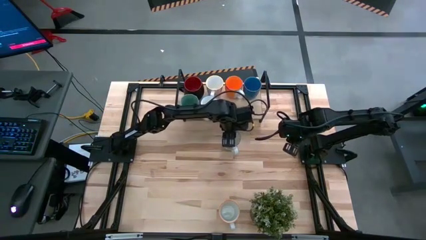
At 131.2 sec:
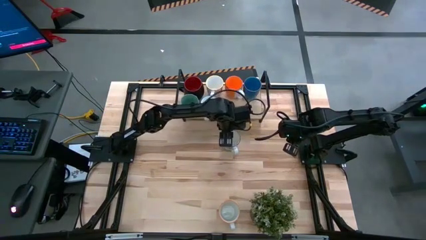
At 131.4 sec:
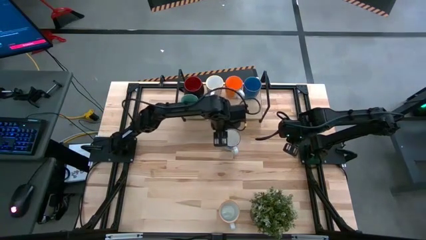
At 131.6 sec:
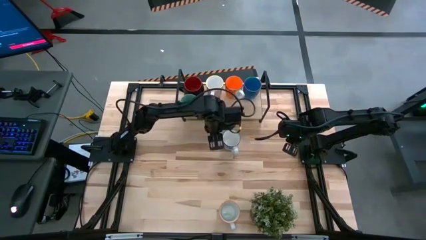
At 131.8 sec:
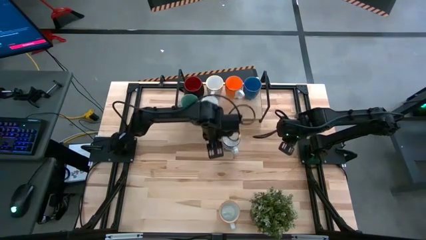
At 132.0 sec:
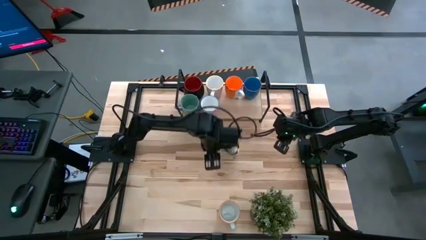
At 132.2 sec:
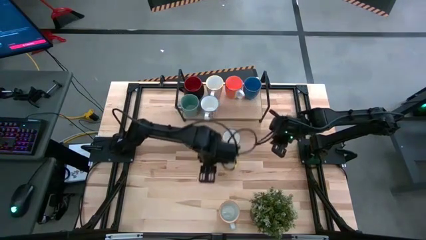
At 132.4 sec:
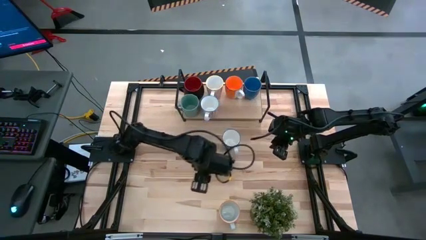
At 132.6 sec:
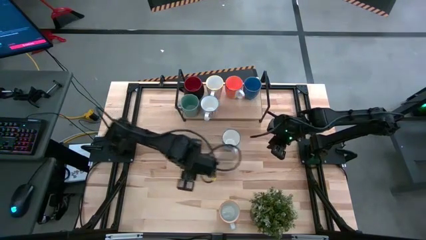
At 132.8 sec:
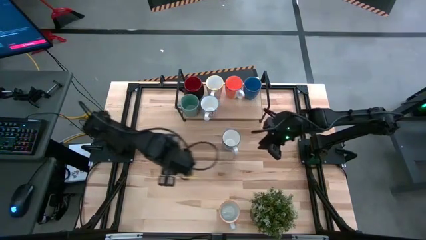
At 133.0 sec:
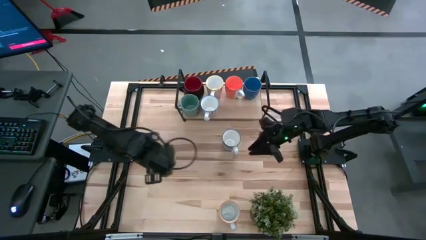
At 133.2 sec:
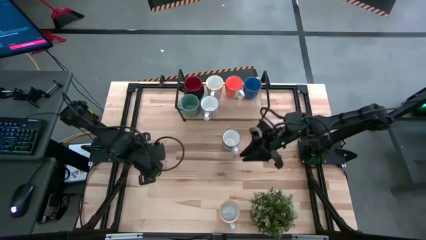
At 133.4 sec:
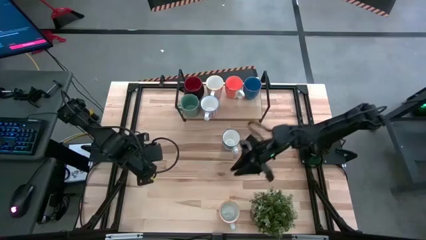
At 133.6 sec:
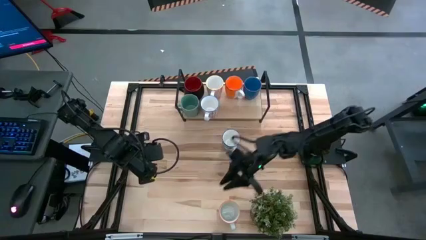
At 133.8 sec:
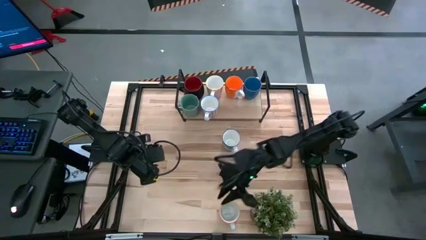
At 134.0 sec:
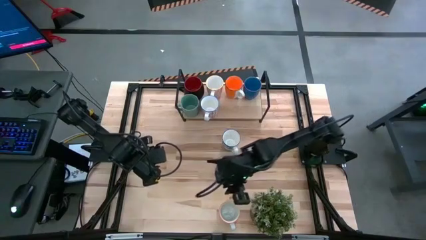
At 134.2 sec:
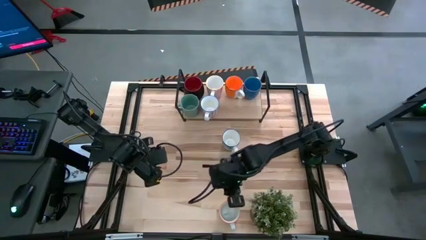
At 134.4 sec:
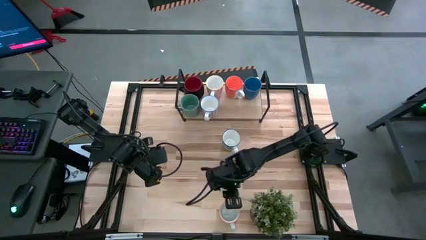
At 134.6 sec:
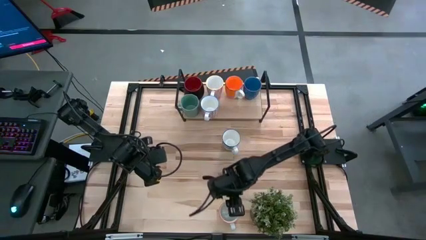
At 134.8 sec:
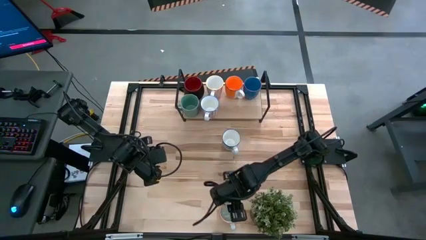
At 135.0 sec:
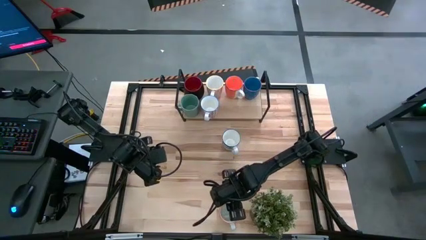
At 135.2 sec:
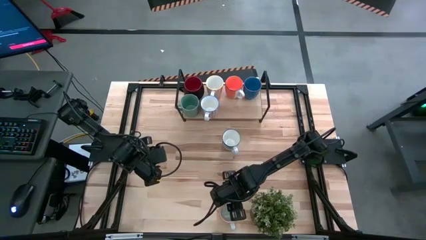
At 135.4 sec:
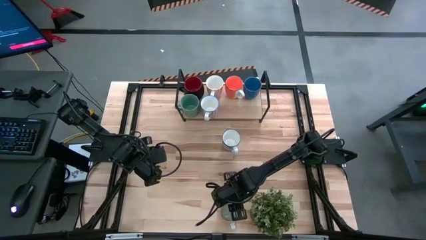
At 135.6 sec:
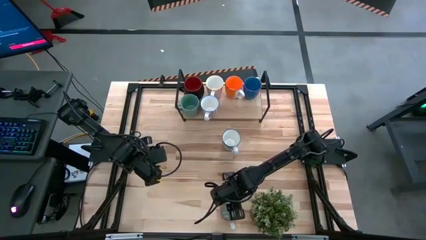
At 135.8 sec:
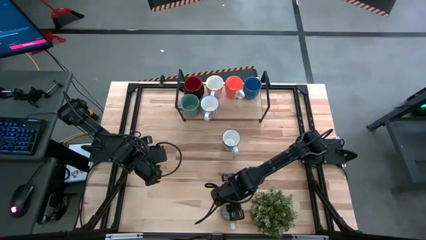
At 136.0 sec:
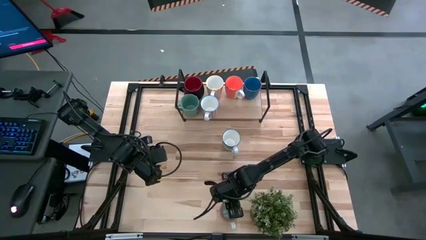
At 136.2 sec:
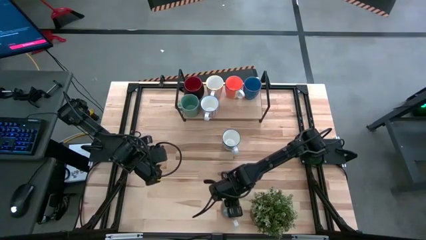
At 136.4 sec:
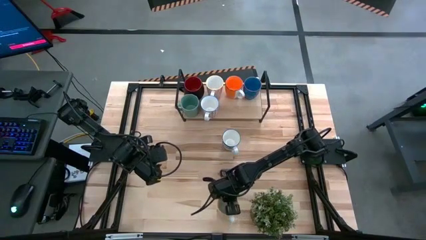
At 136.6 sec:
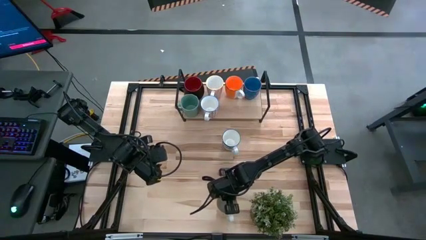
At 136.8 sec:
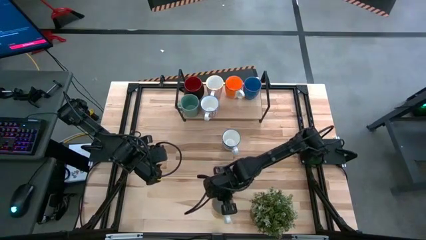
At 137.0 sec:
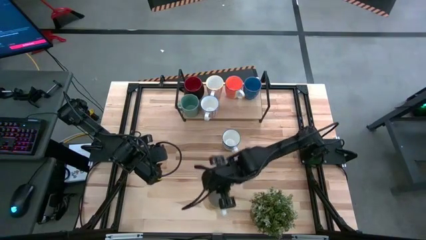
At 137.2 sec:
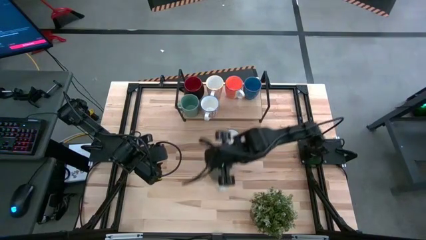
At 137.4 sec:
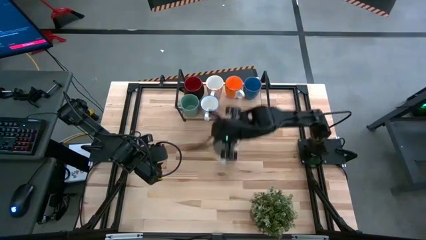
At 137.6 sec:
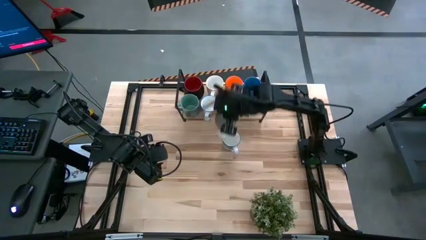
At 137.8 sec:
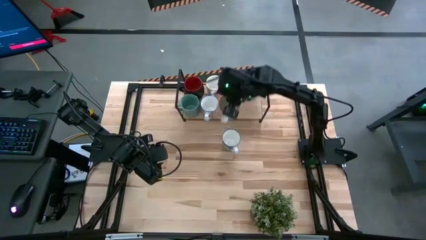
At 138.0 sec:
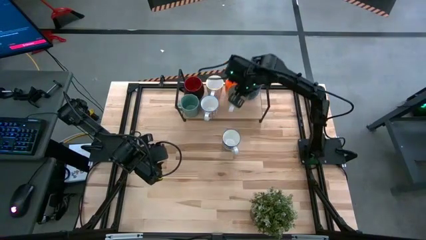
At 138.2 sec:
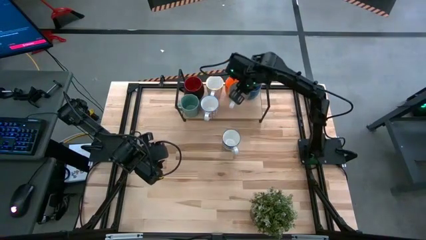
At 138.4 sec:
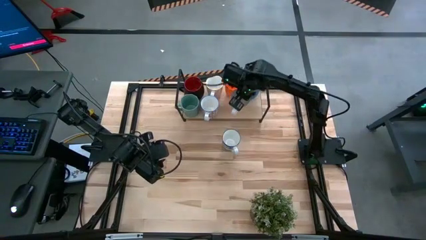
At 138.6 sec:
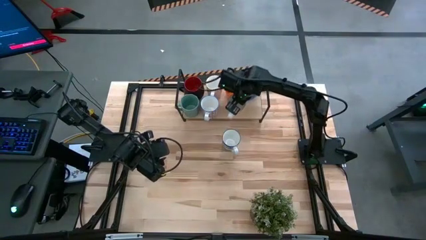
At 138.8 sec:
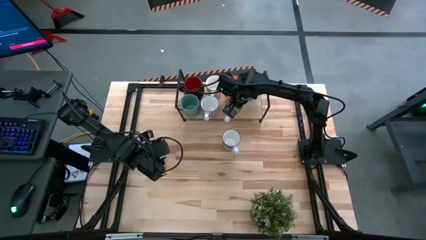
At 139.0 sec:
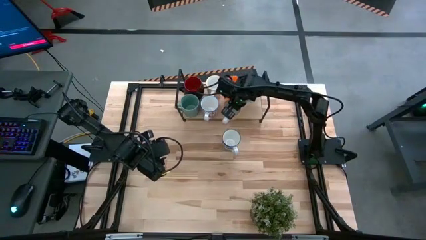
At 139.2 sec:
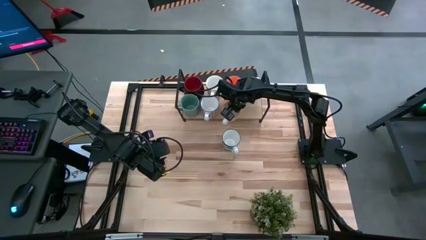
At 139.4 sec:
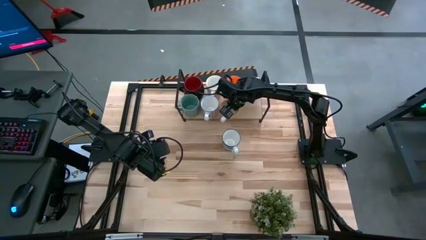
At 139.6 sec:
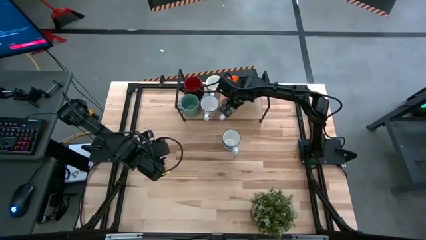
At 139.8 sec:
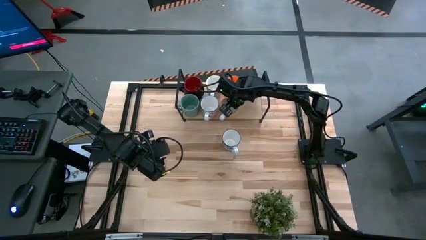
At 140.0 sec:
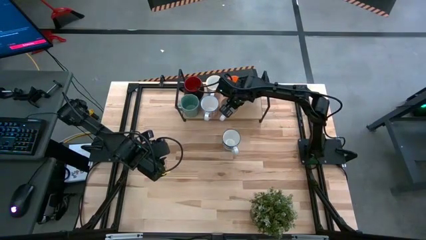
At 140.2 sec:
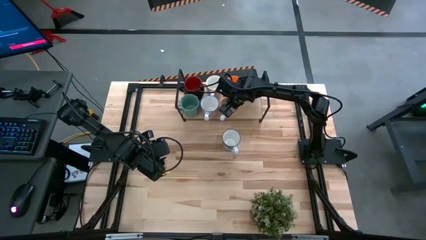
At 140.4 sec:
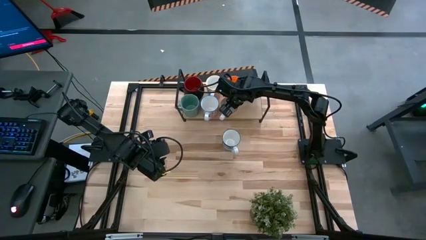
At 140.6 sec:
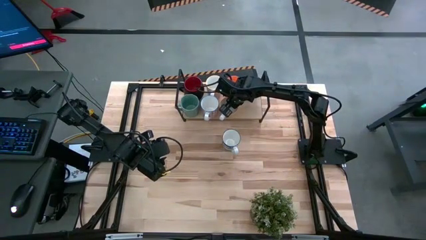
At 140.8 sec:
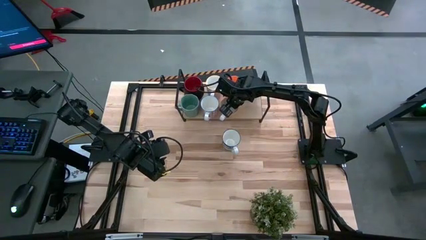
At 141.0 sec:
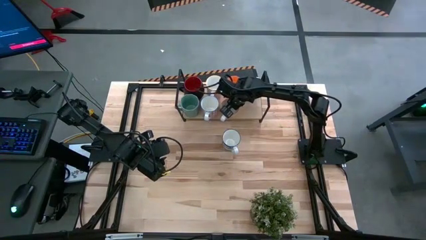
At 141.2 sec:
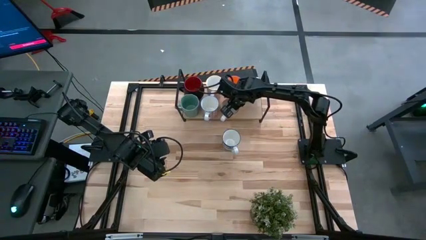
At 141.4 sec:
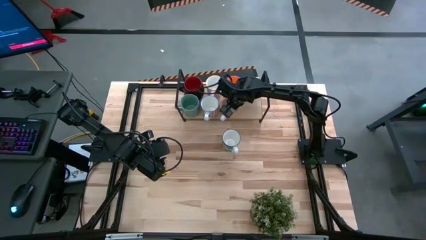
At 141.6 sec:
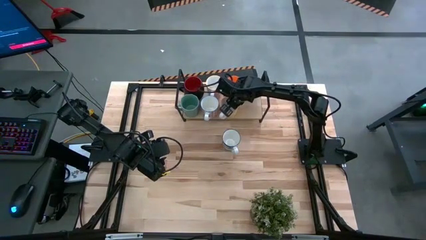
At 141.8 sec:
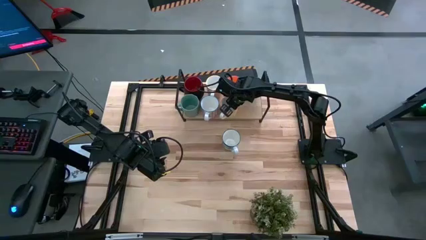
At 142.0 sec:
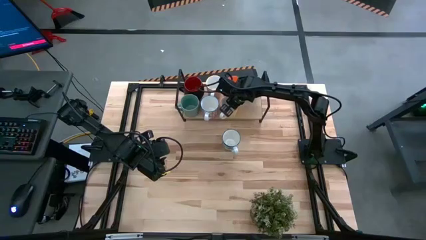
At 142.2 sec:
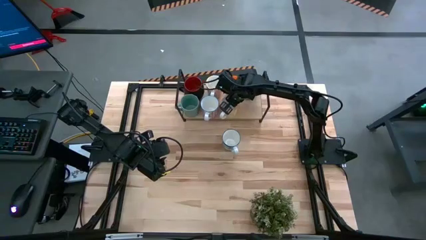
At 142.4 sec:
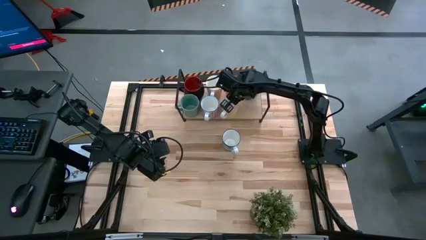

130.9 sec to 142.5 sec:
Task: Place coffee mugs
Put the yellow pattern mug on the shelf

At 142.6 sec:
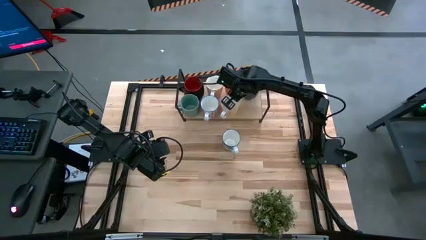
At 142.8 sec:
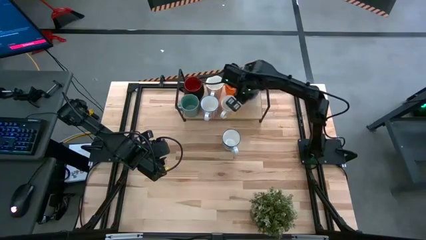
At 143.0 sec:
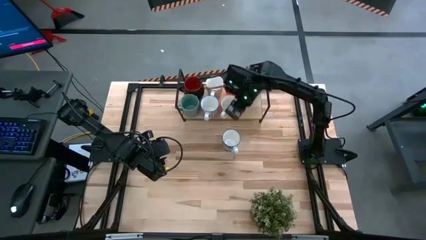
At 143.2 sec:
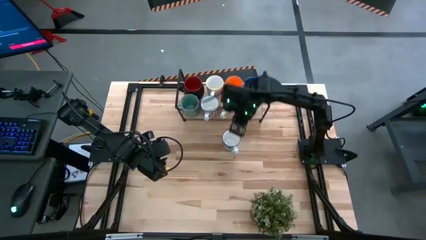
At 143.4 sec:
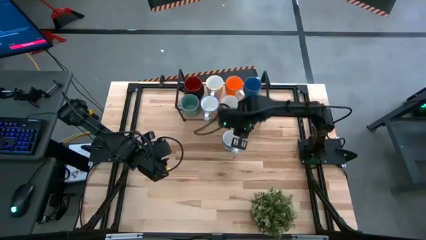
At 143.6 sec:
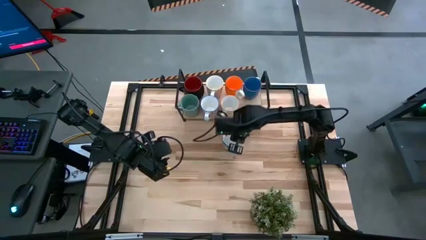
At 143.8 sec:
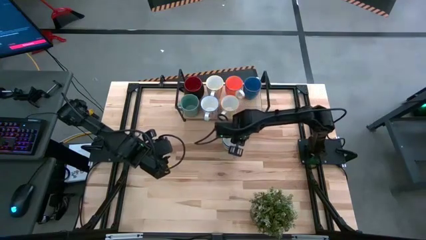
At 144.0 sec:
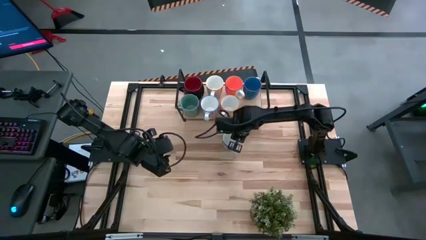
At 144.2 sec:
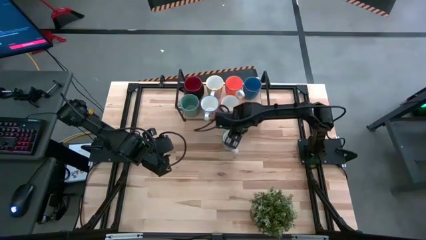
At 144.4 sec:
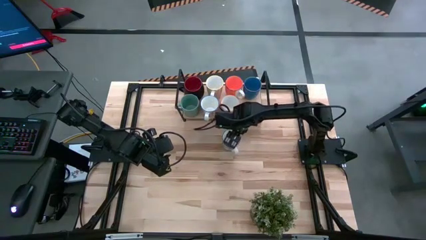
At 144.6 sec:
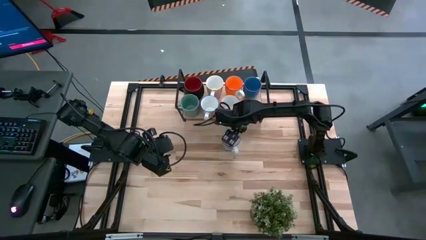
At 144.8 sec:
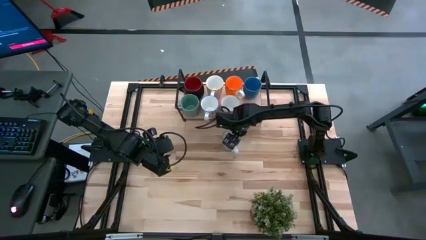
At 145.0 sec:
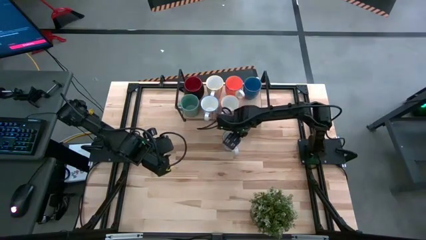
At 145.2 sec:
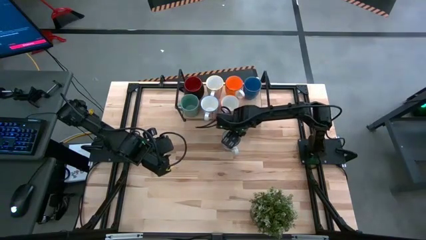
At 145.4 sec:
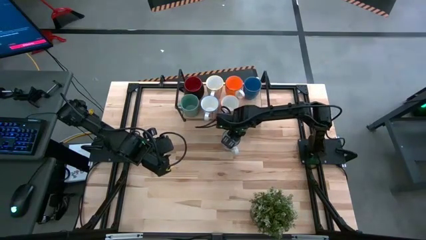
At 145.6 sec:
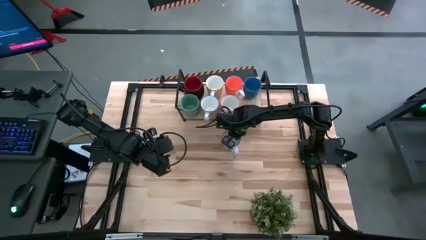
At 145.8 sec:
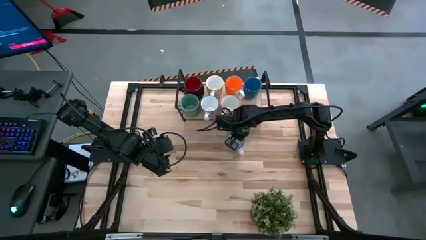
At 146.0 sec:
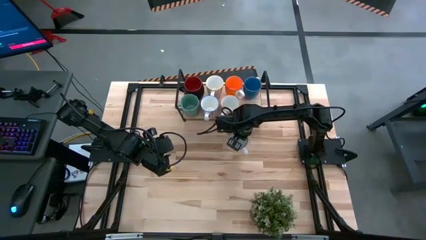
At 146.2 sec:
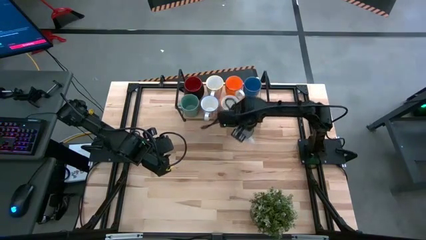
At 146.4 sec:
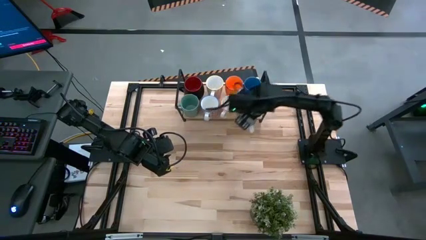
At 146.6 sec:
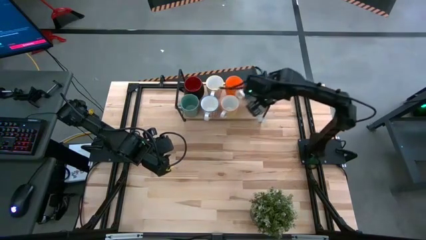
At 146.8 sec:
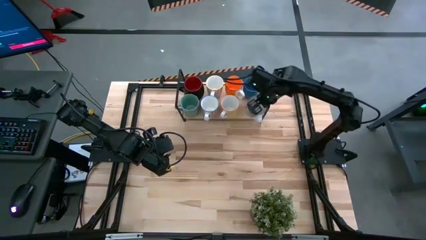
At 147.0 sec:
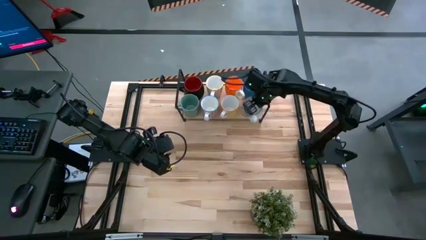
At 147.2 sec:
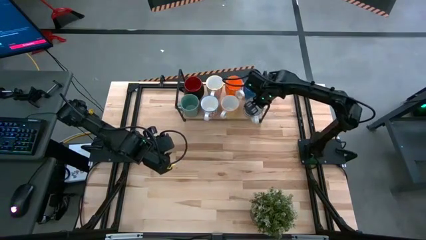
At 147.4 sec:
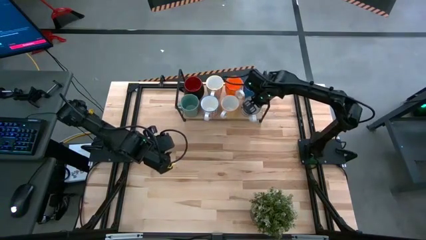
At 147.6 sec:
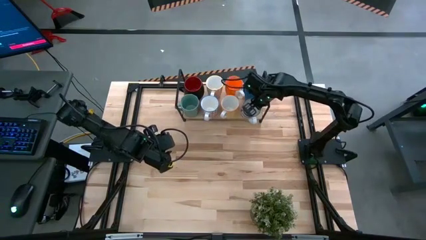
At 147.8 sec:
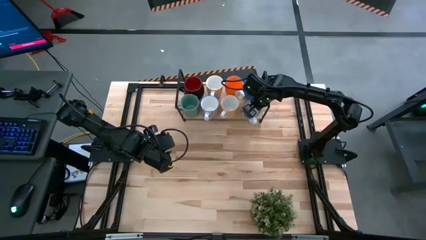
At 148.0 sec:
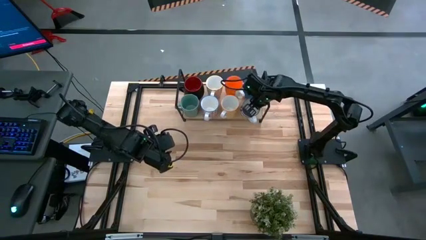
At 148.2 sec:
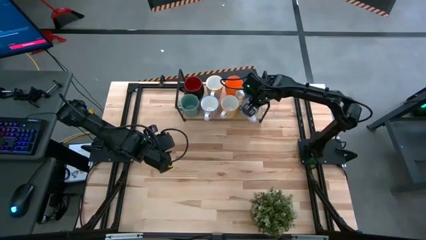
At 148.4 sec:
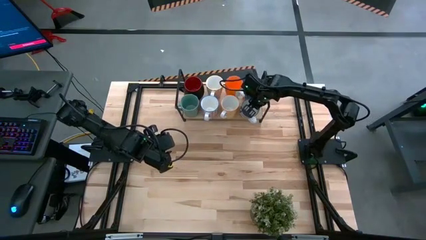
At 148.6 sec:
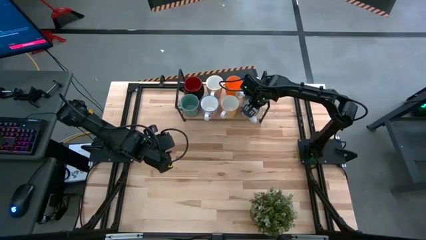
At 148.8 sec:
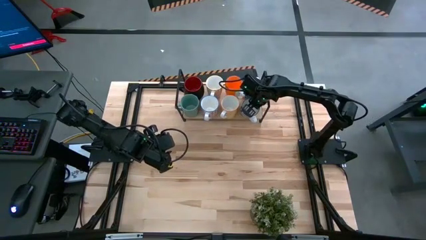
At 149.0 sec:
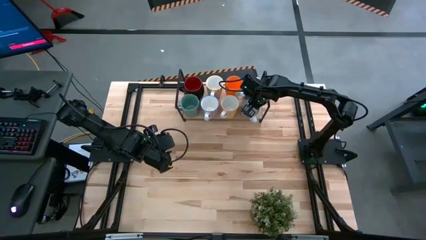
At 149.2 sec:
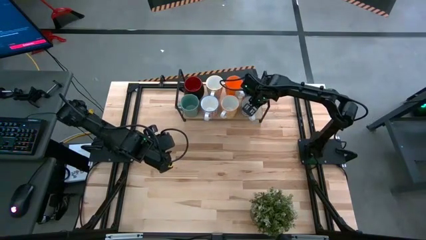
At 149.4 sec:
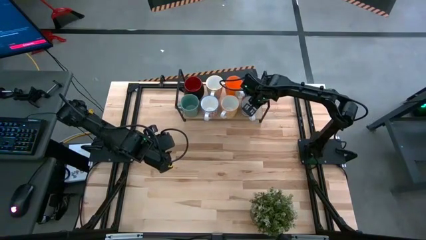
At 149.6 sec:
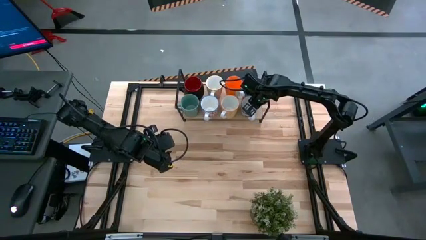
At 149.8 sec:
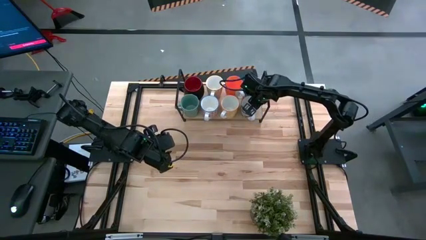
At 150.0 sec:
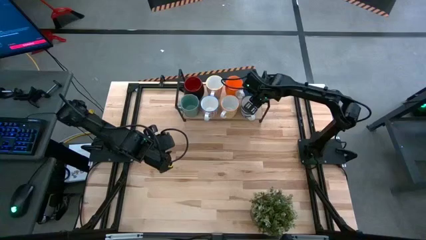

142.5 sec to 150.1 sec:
Put the blue pattern mug on the shelf
